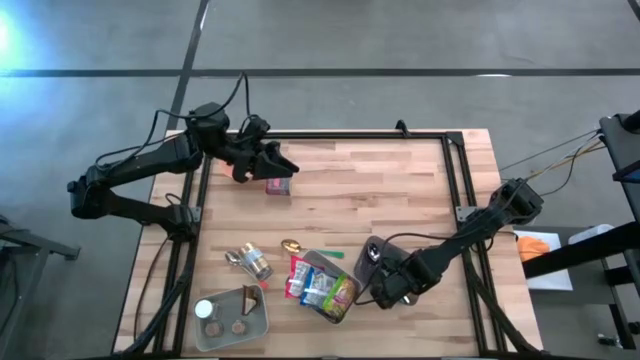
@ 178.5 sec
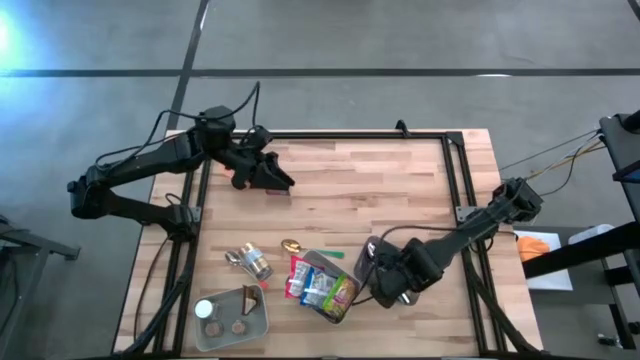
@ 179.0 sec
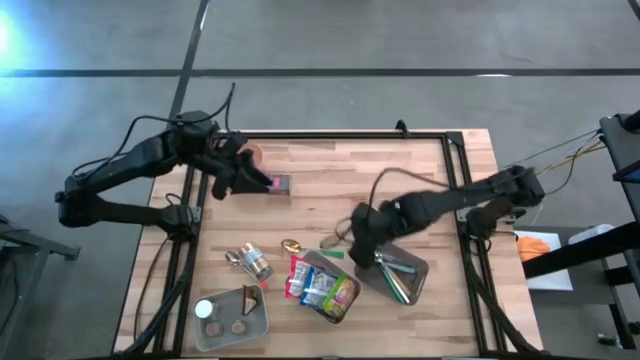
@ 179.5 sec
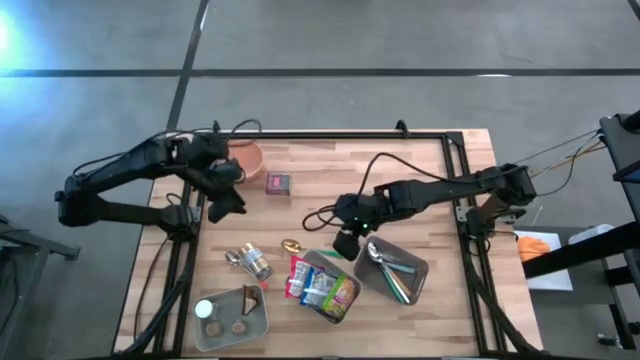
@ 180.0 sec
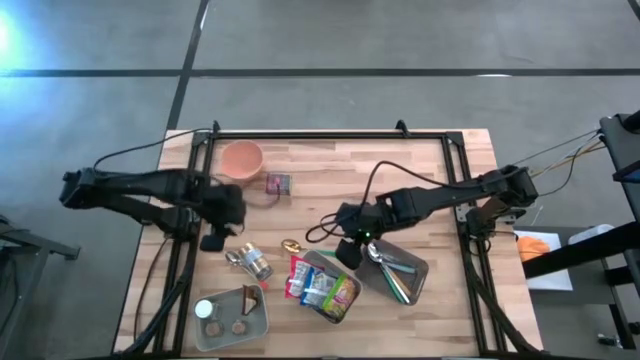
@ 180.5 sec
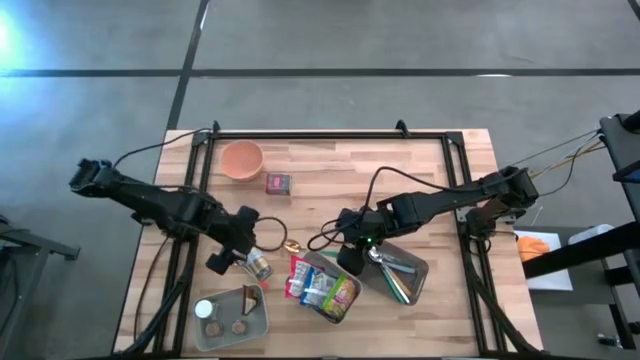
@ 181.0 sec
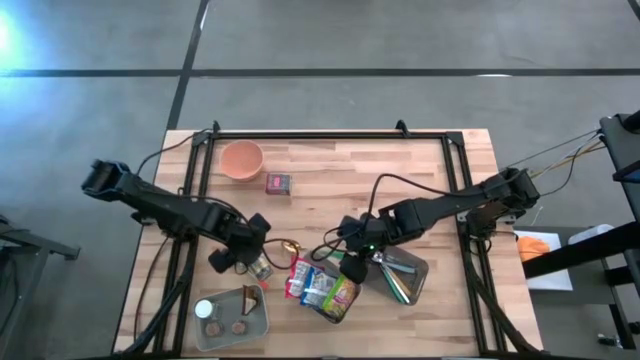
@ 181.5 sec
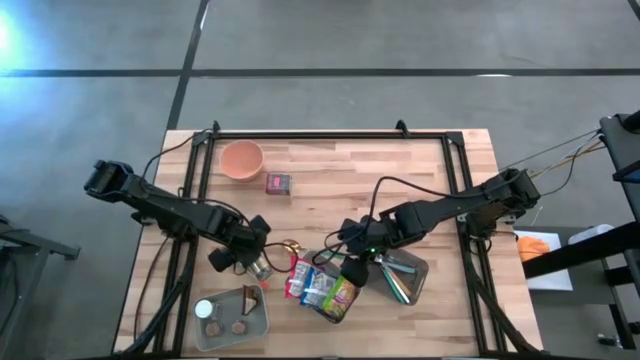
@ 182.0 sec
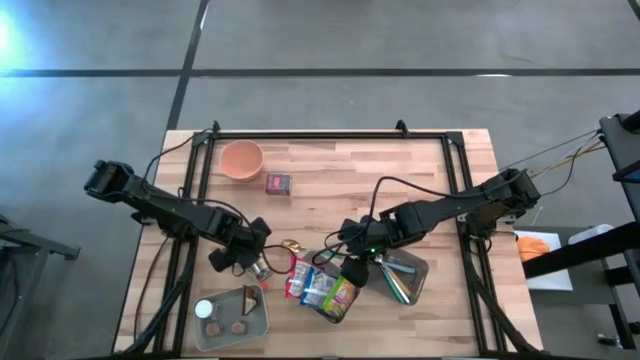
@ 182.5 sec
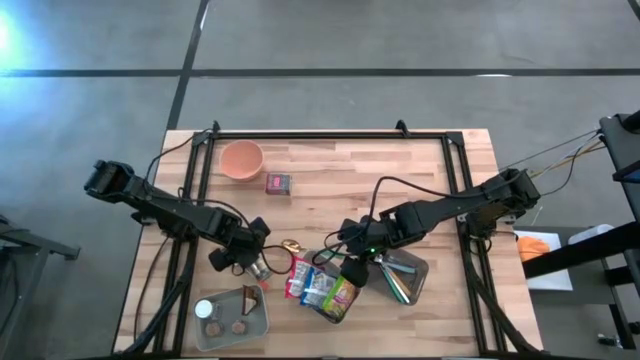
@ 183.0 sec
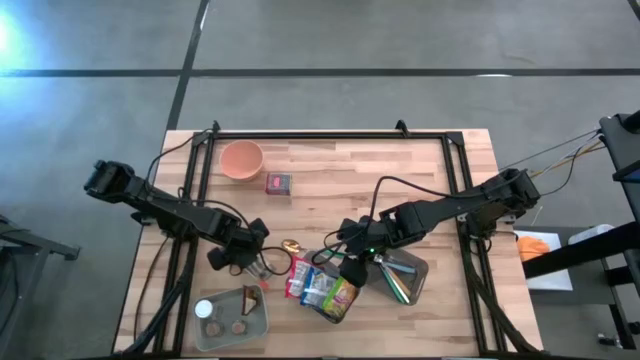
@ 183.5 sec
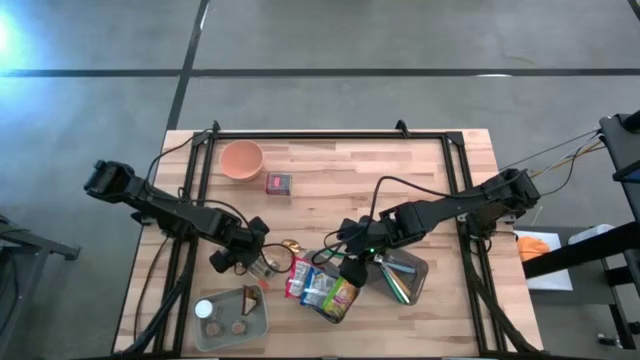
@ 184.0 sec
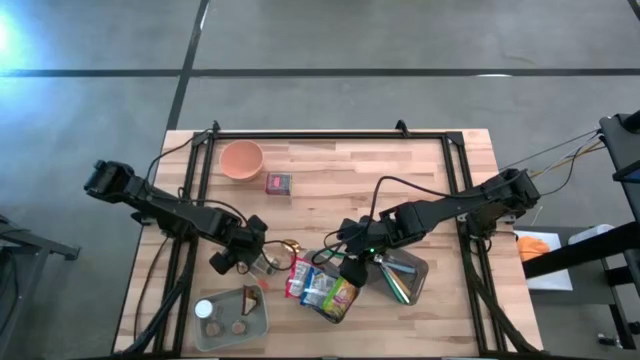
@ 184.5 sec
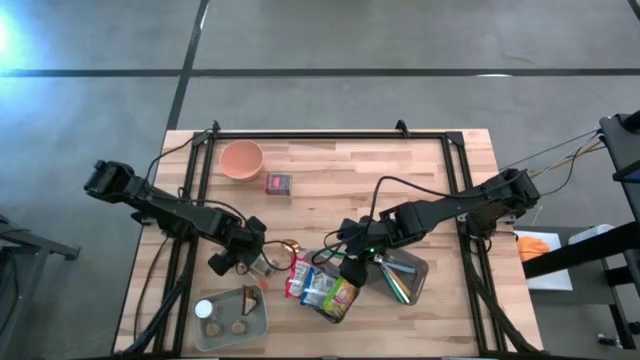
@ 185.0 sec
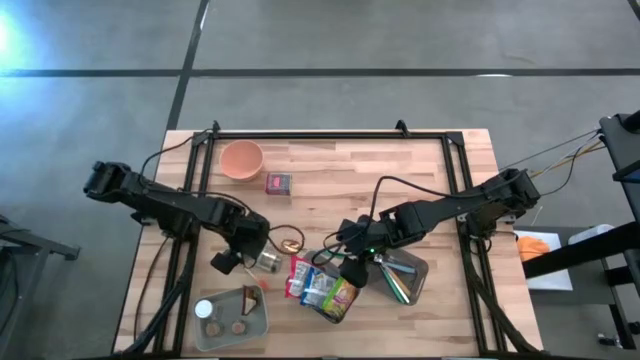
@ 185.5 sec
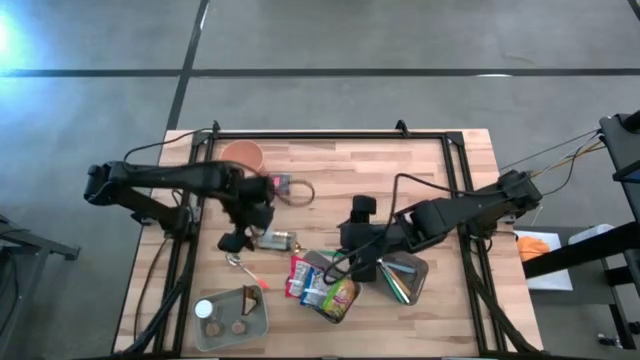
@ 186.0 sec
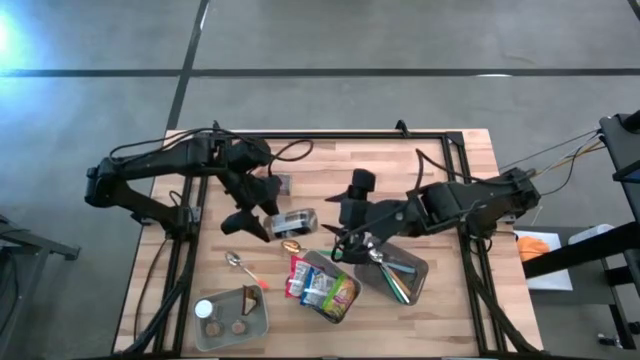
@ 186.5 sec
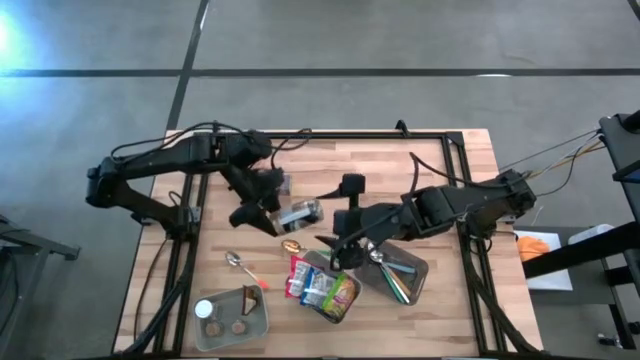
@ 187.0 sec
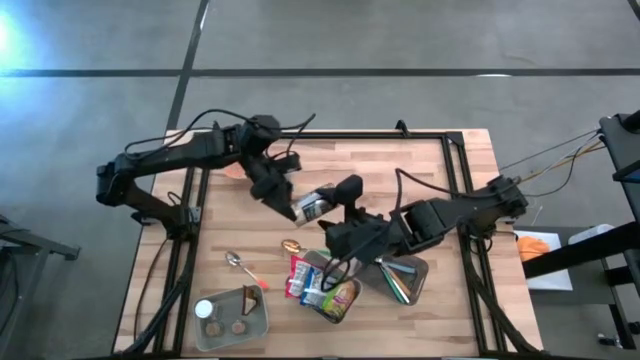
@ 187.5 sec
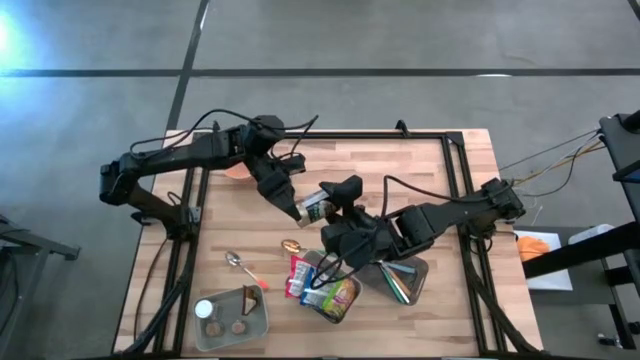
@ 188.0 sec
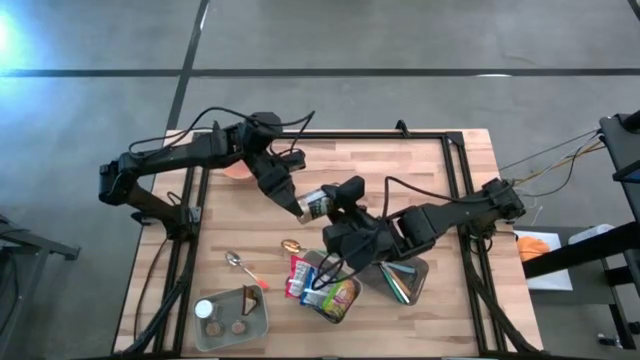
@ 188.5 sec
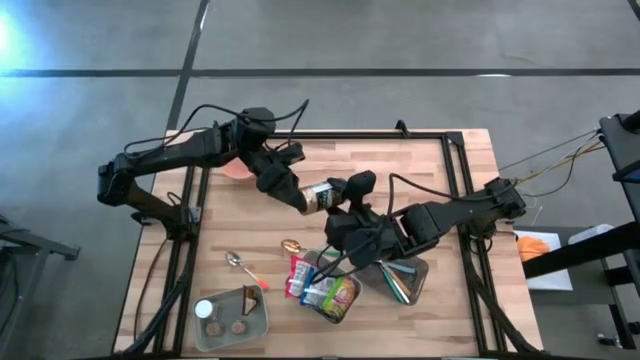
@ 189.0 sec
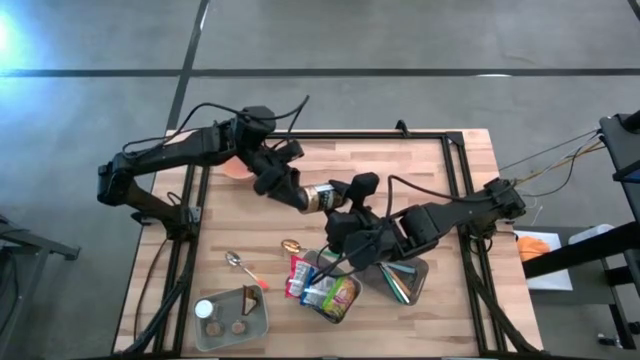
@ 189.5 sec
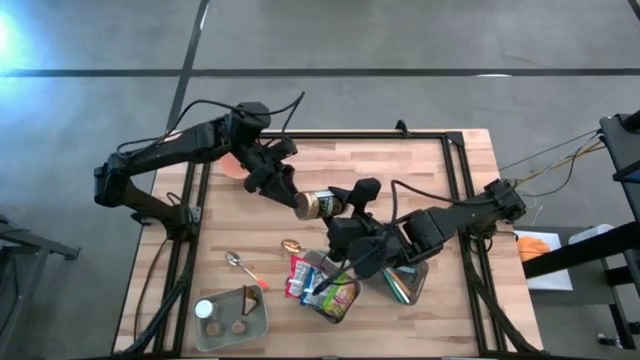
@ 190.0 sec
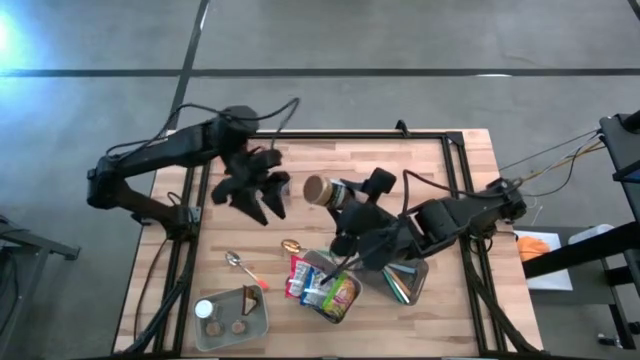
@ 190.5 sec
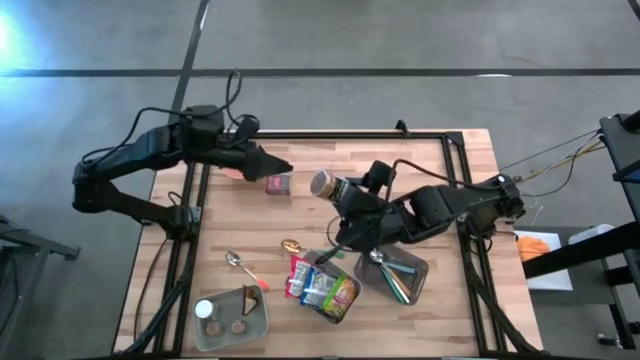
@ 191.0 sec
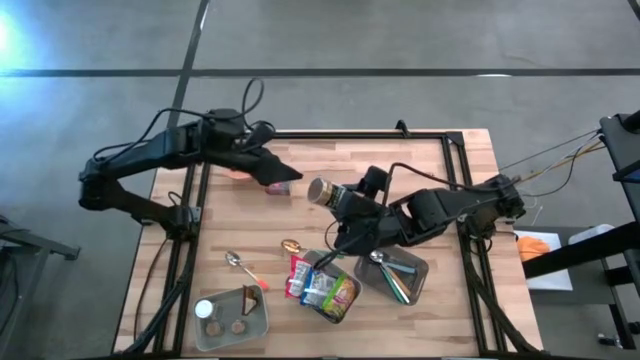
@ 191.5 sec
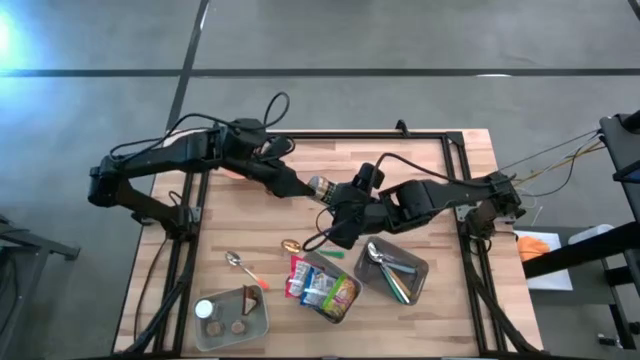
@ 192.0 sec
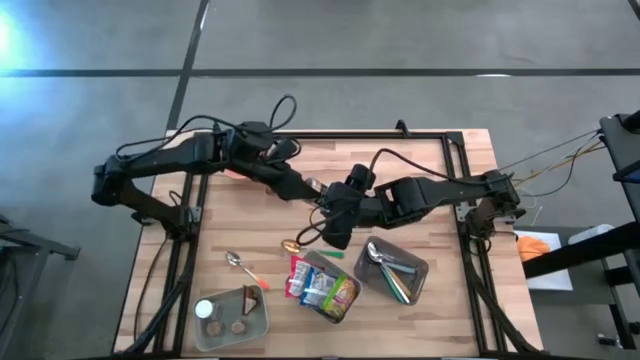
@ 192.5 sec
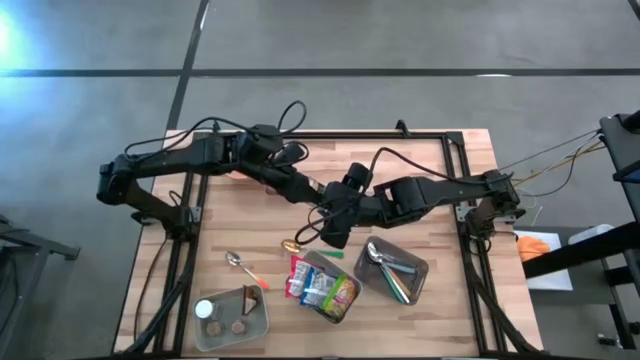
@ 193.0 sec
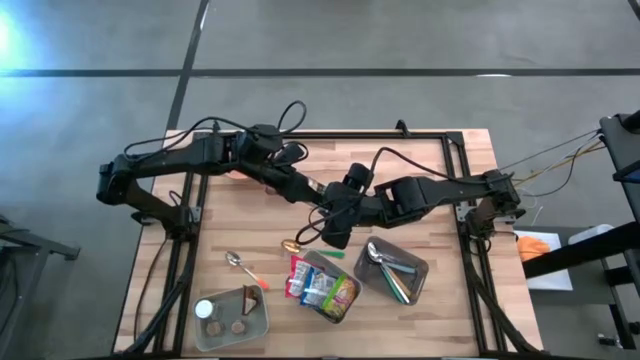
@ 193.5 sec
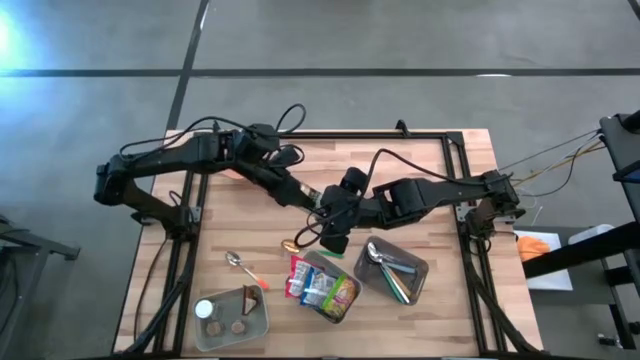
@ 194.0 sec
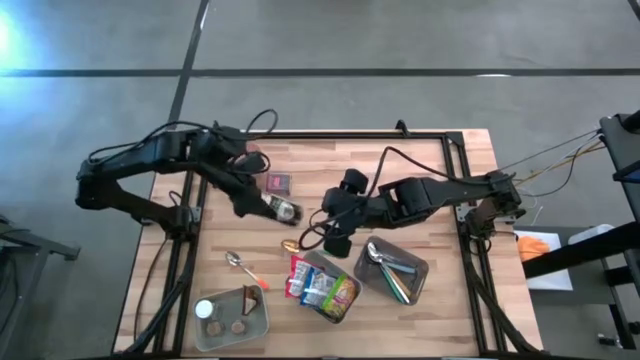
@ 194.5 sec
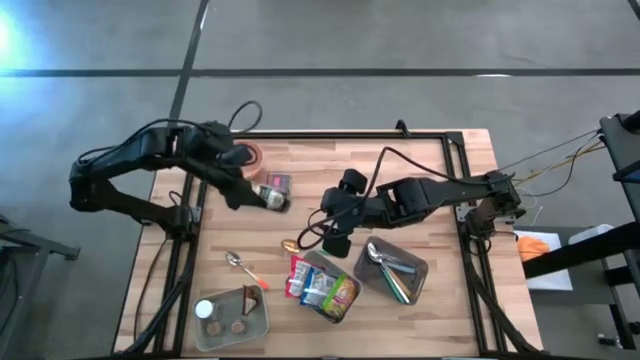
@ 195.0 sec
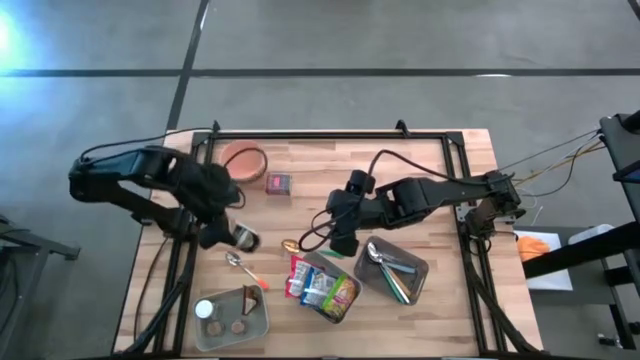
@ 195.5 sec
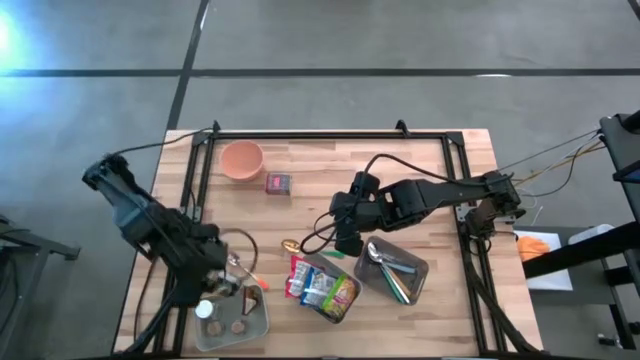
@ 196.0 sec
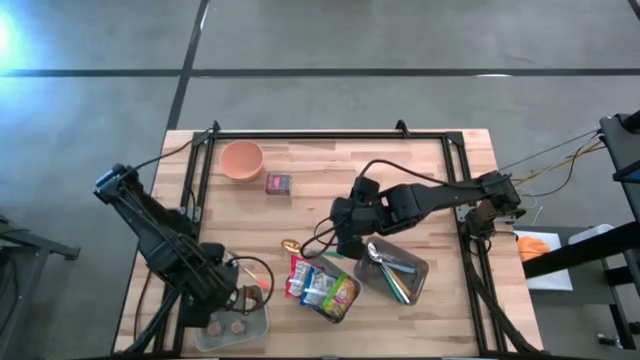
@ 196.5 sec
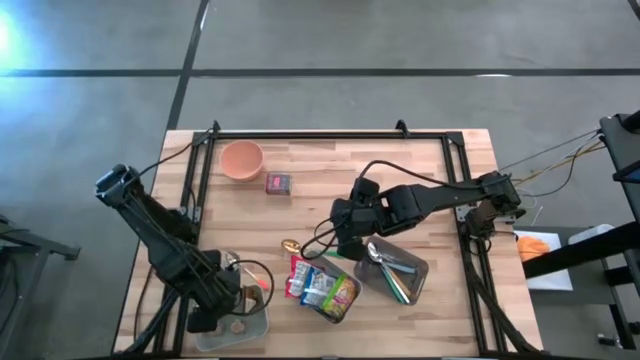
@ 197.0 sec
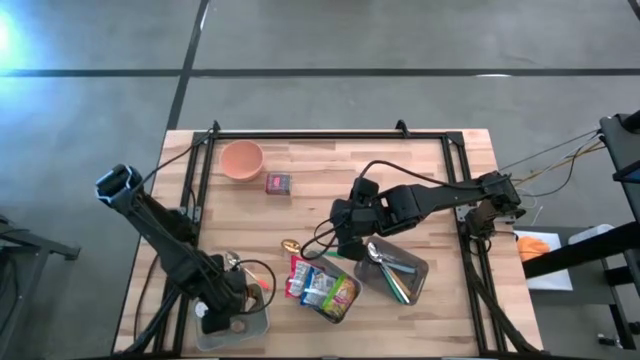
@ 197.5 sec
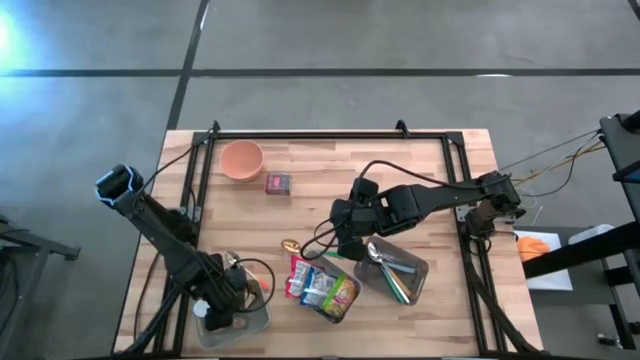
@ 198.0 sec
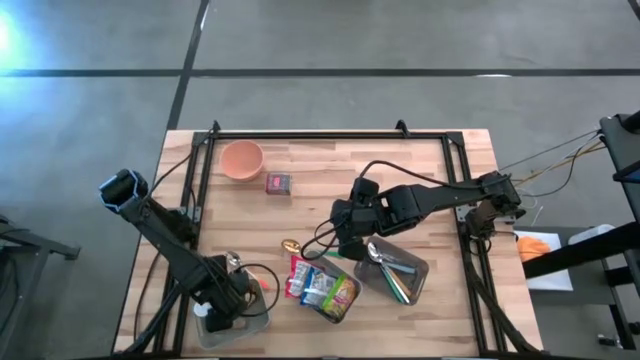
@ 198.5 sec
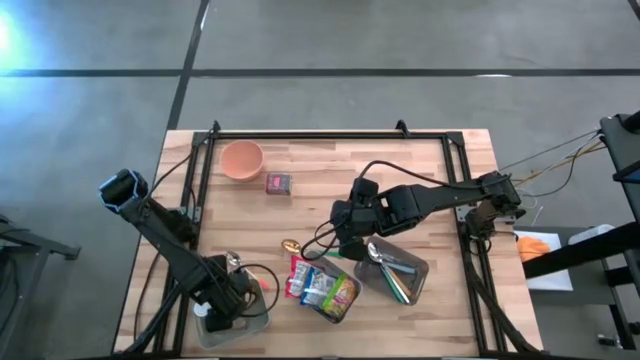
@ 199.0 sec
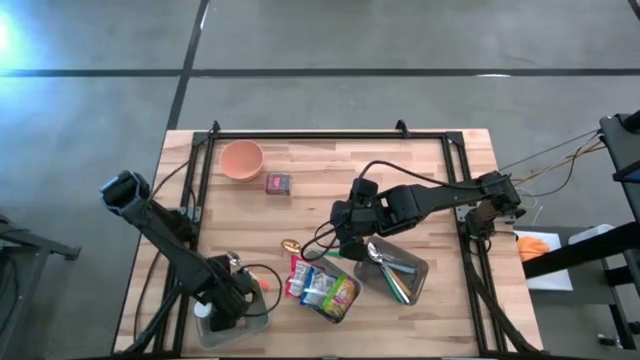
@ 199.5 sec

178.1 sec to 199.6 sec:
Put the gold seasoning bottle into the left gray bin
